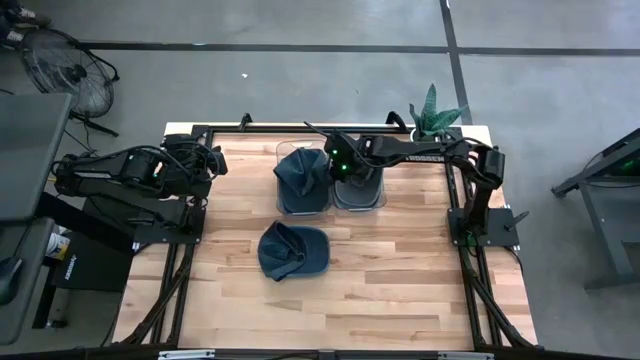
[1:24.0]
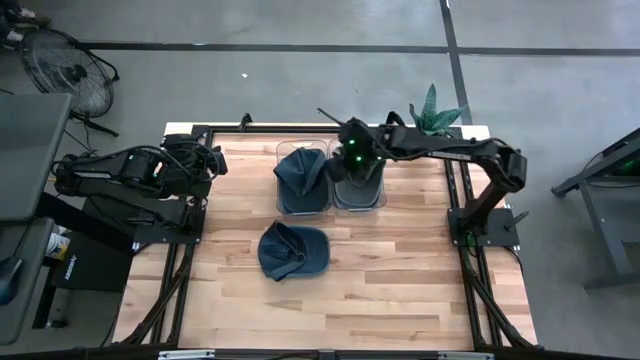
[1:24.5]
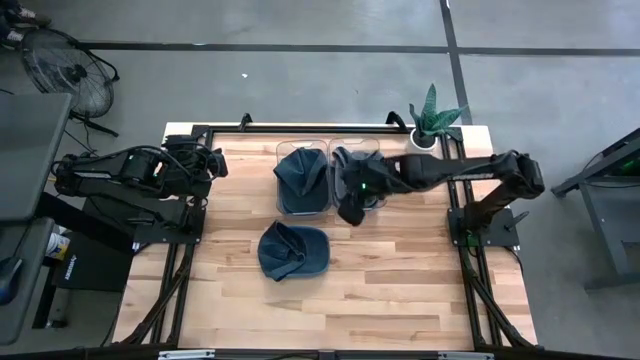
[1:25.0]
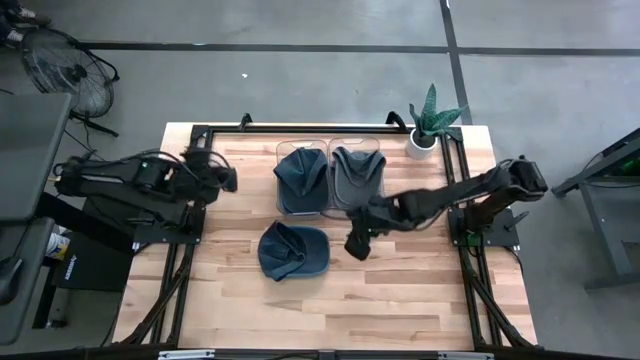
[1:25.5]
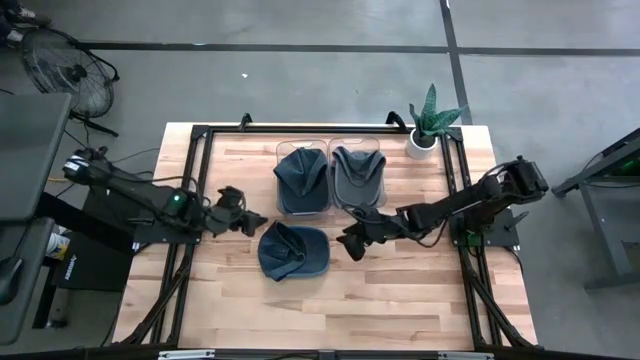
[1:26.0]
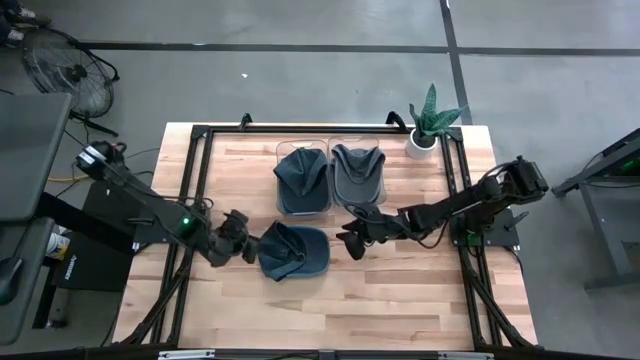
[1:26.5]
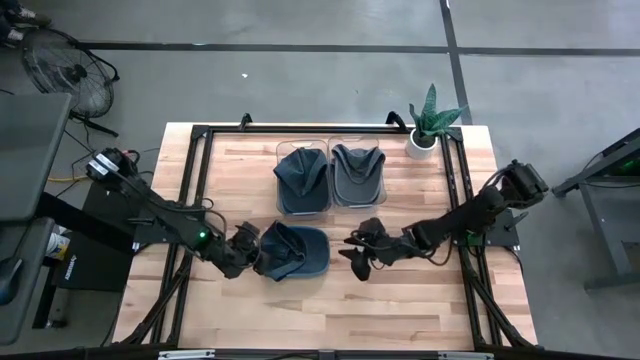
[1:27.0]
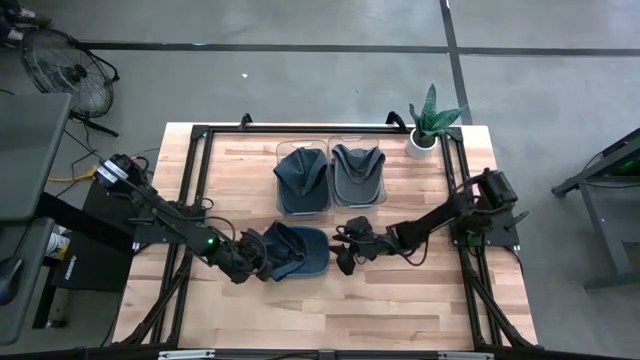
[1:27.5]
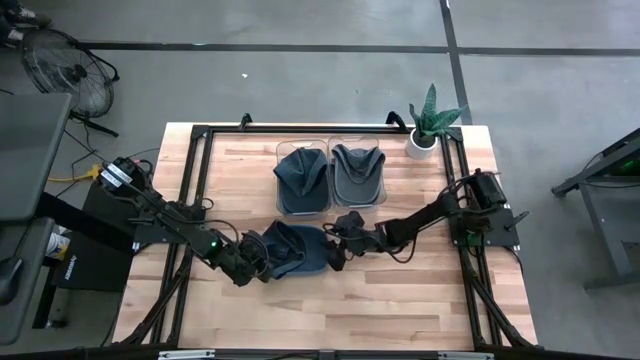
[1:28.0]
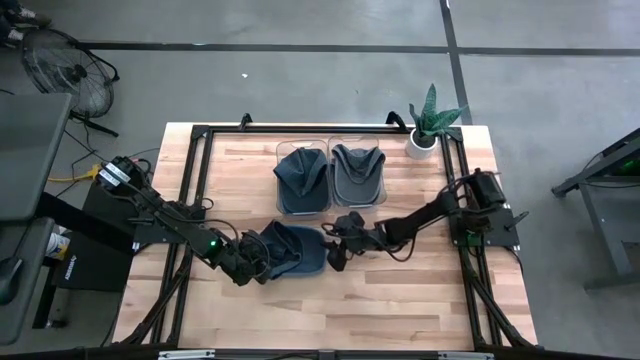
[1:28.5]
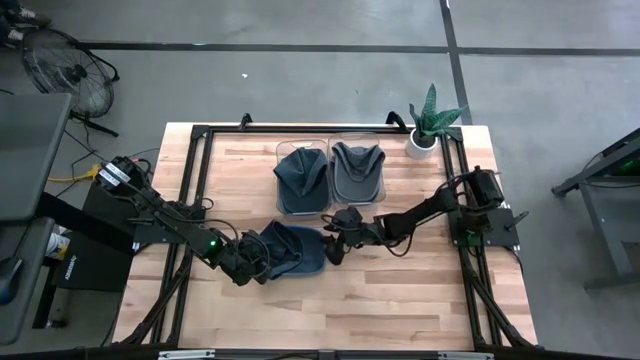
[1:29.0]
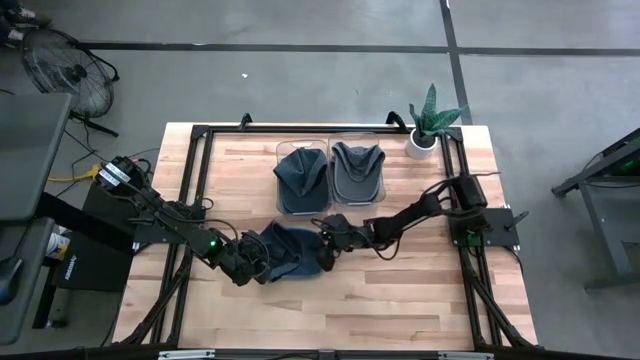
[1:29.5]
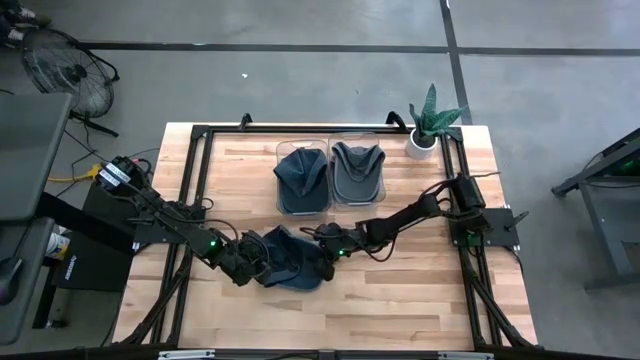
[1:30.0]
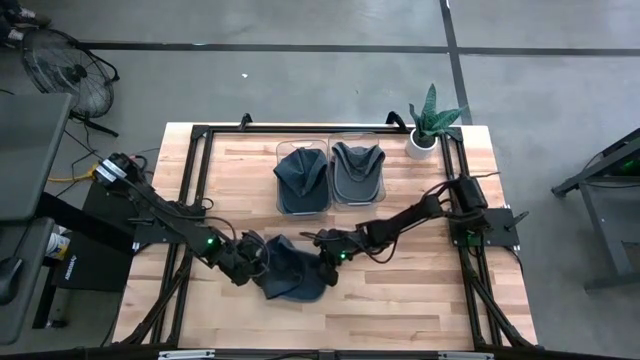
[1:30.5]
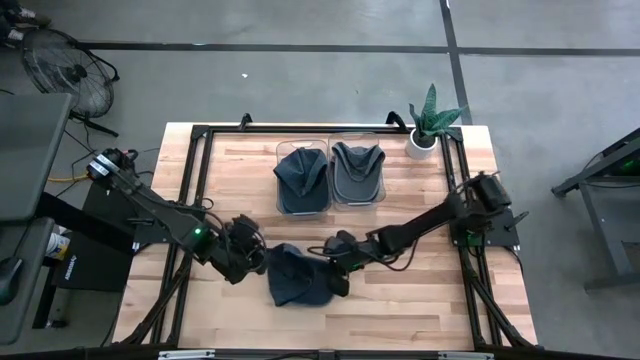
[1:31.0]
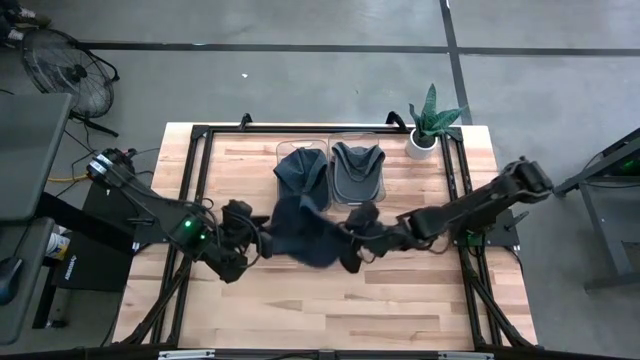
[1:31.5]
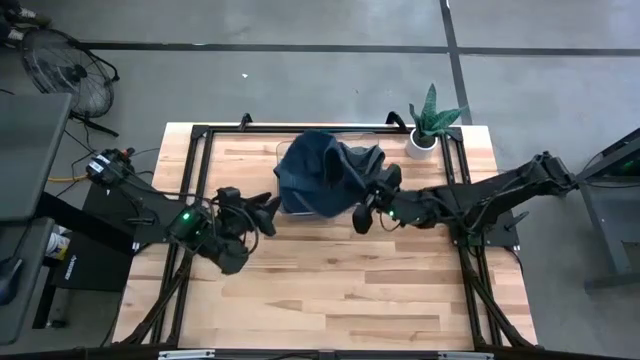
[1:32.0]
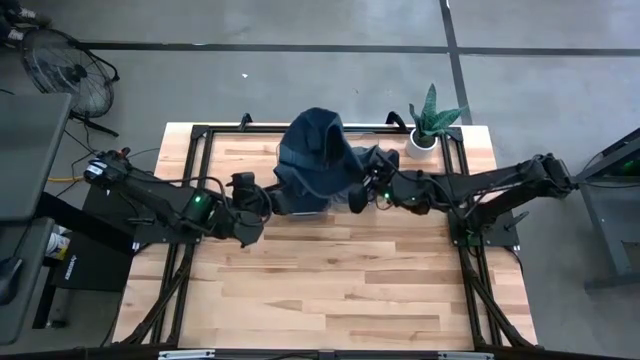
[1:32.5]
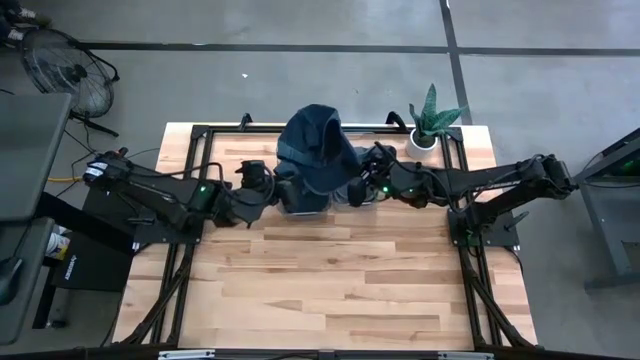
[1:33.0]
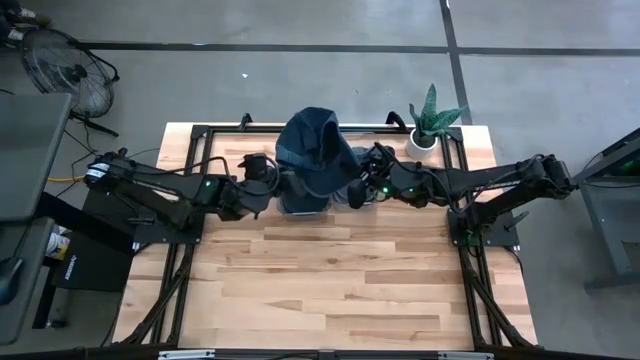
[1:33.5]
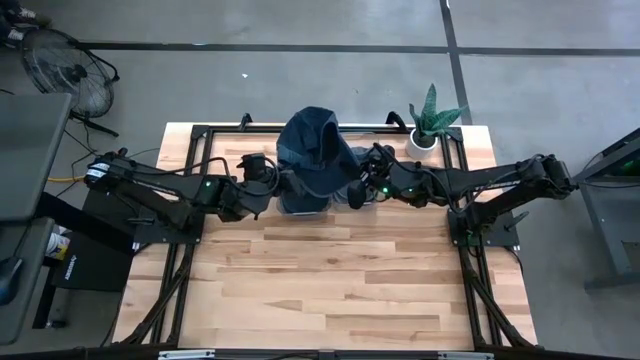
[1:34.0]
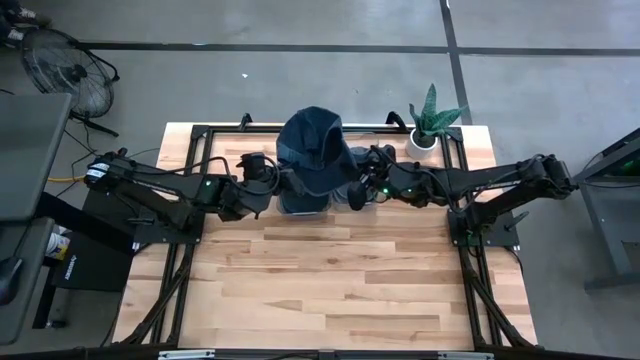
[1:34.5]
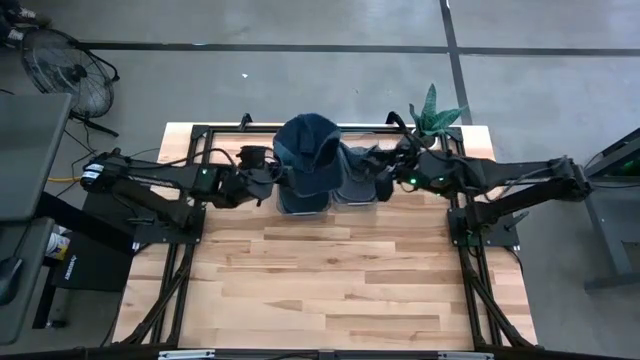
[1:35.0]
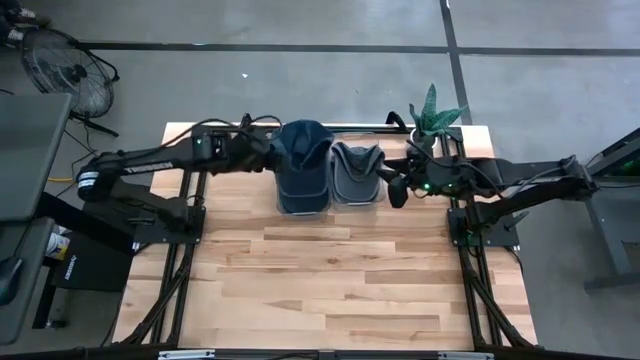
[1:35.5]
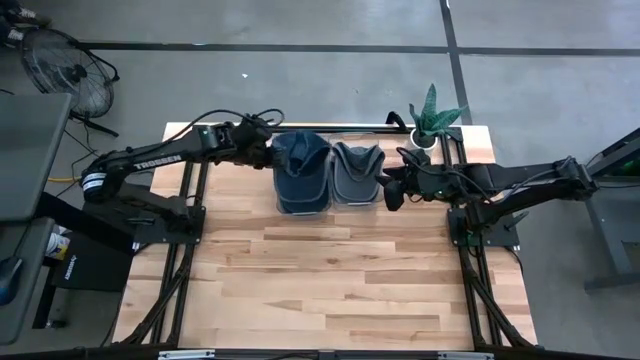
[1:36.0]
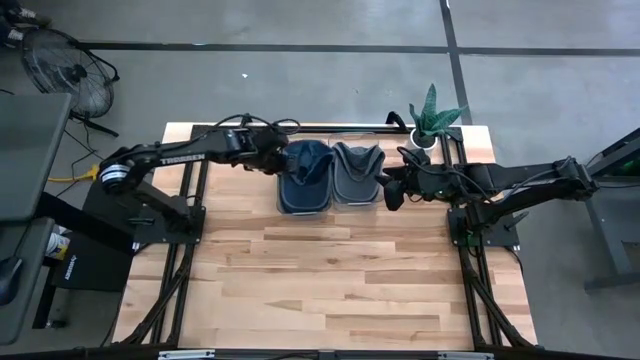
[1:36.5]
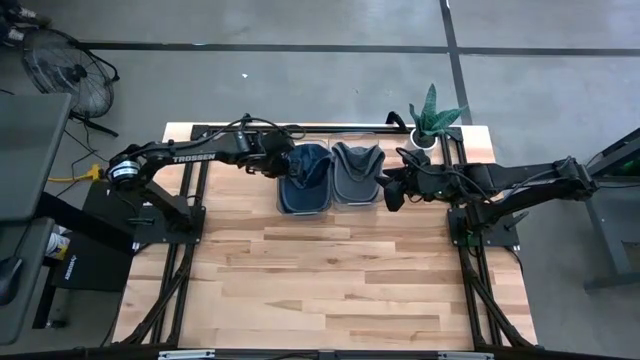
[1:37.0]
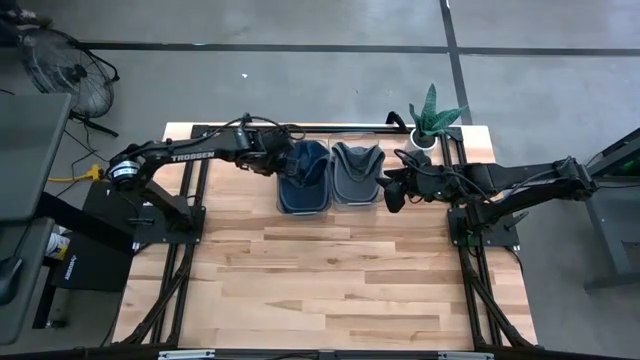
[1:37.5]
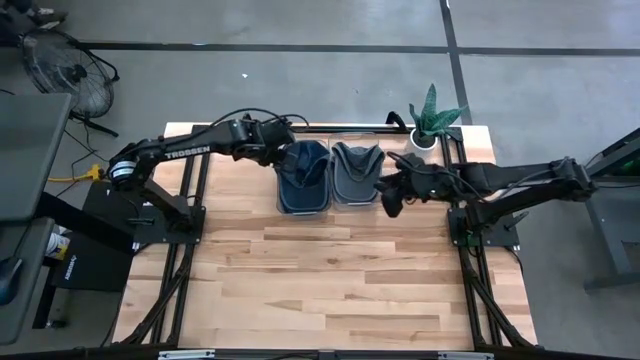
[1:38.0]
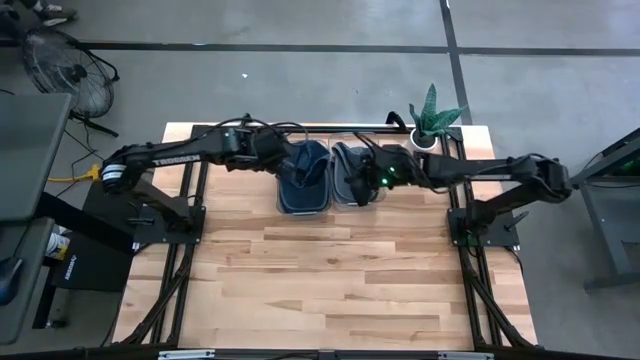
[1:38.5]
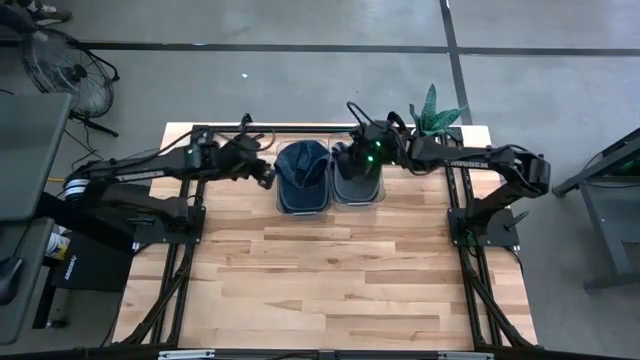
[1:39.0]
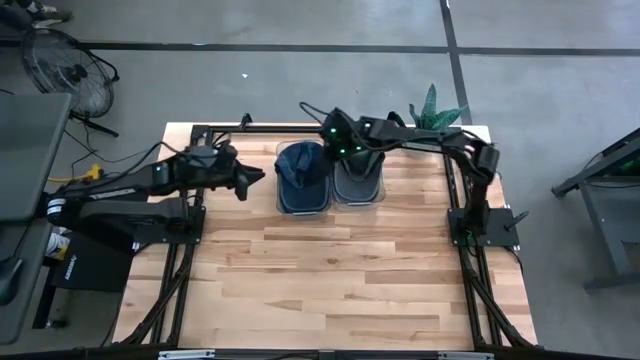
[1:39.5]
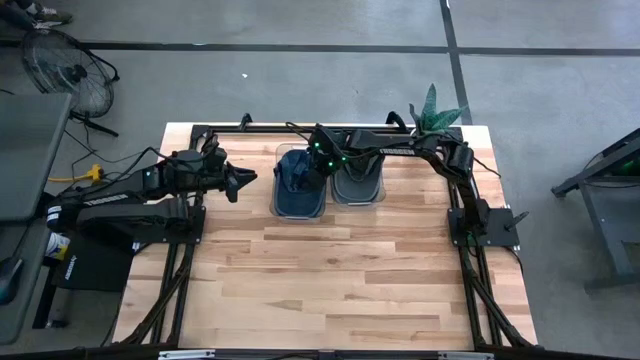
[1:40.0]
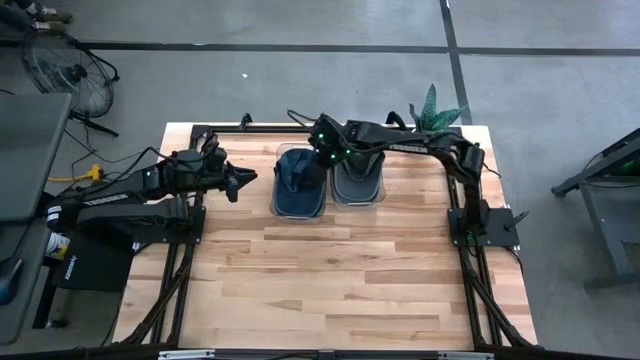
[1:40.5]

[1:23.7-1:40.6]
Task: Pick & Place hat
Put the blue cap into the left transparent bin

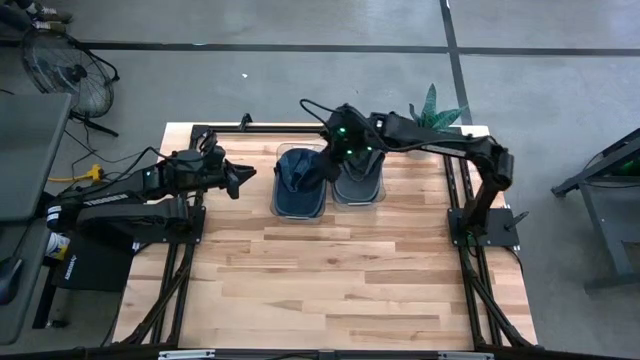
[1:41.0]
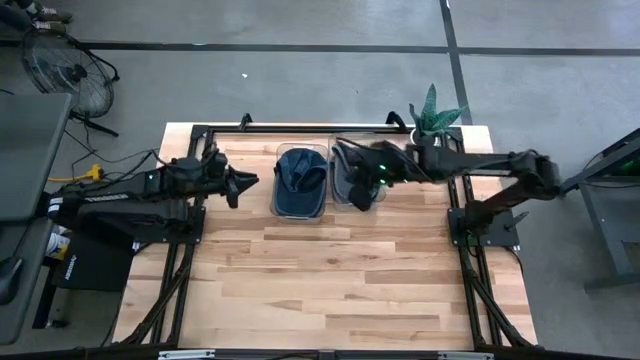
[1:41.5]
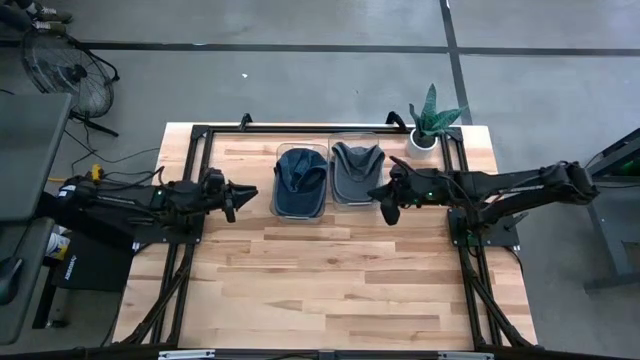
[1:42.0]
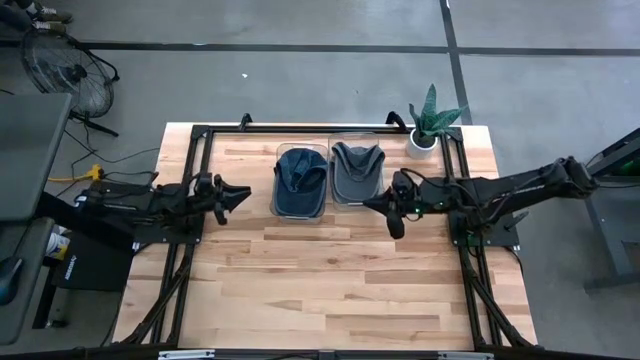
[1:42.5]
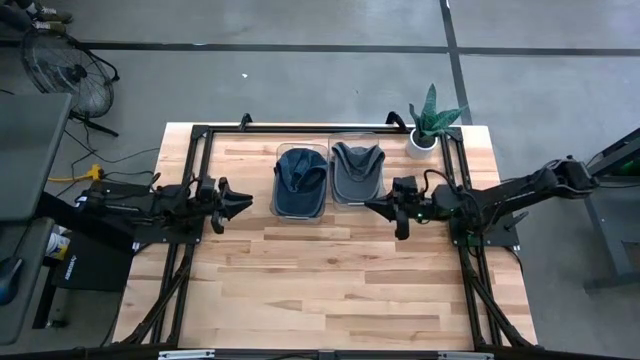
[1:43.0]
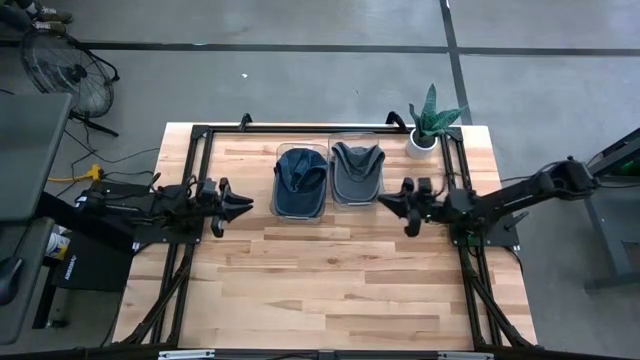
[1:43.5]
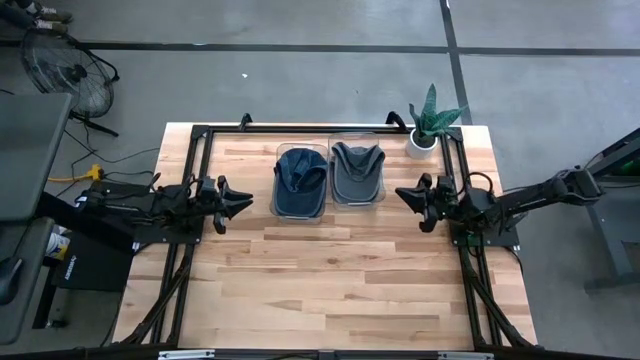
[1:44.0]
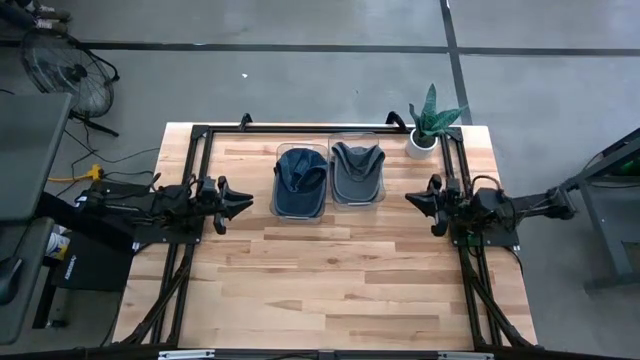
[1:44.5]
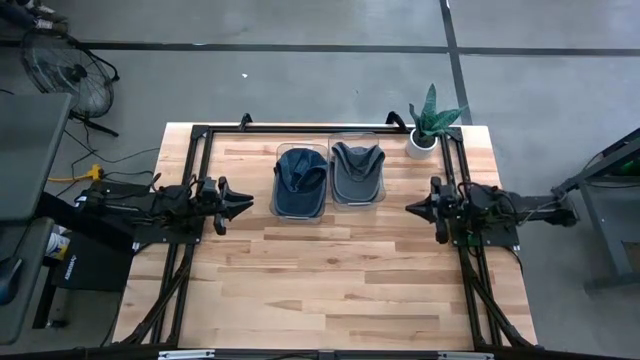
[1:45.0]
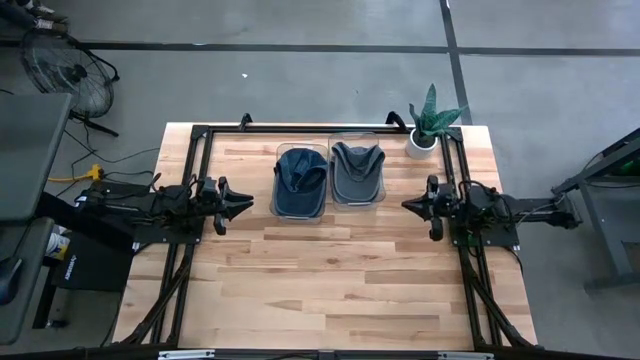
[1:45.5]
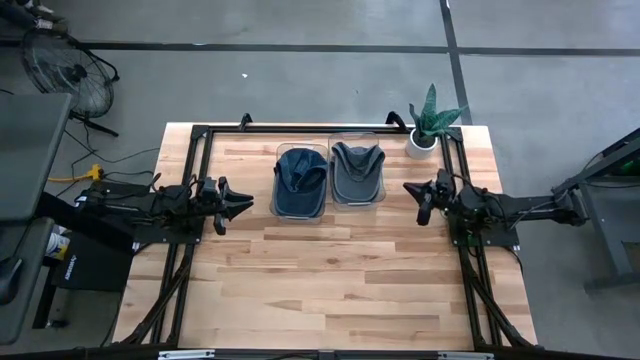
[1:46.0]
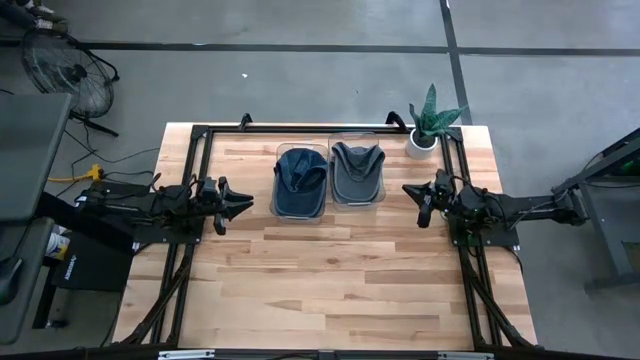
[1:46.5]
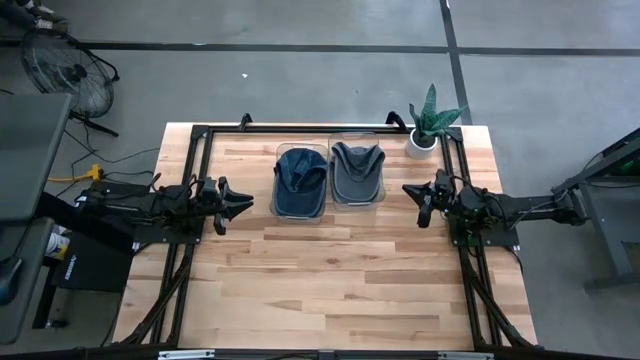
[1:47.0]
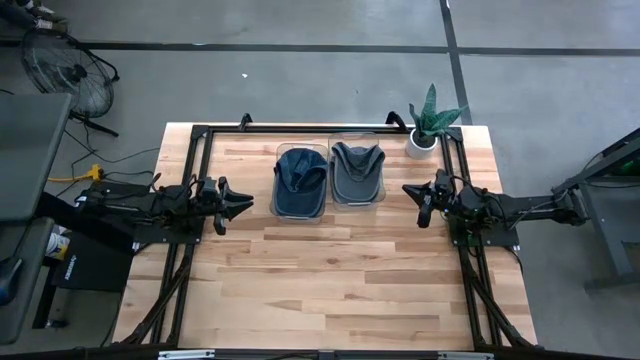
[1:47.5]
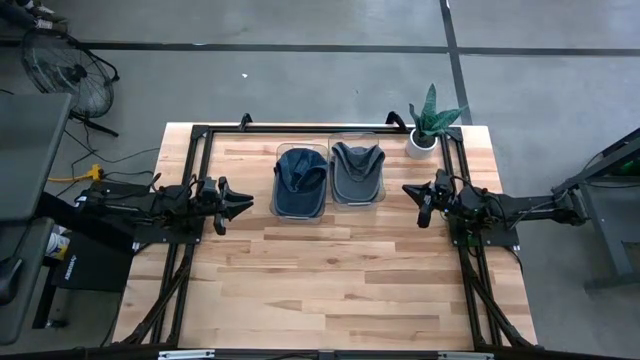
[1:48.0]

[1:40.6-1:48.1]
Return to Home Position
